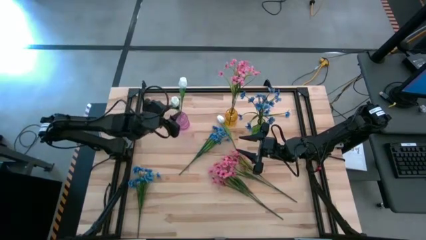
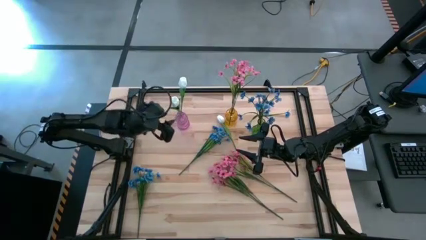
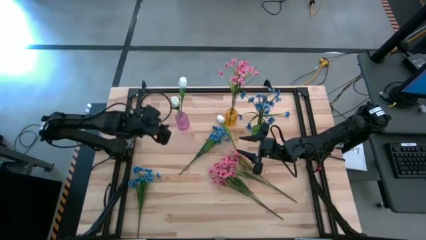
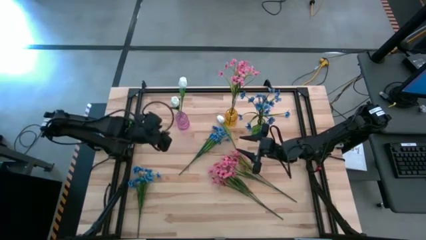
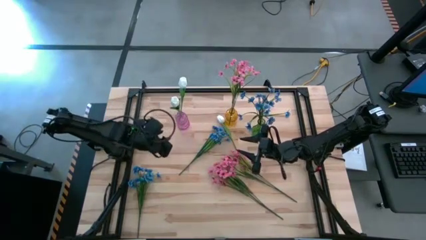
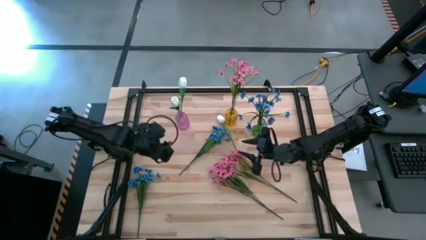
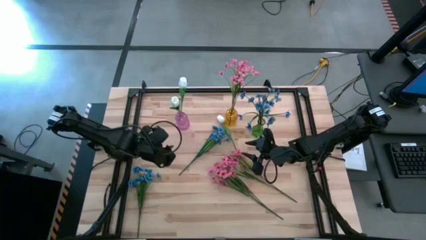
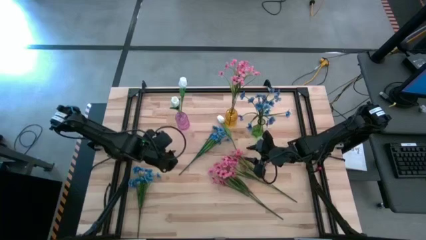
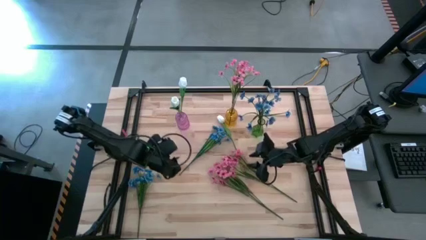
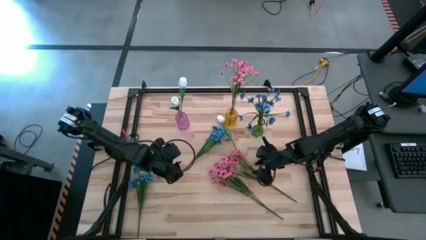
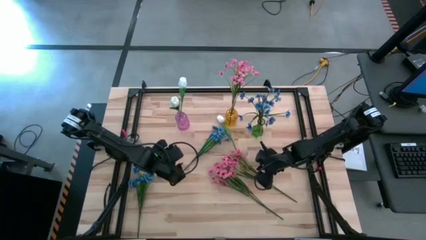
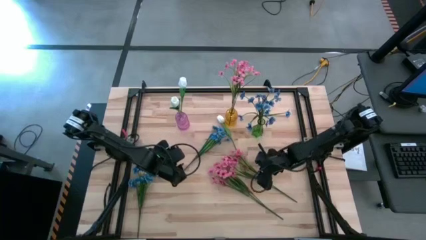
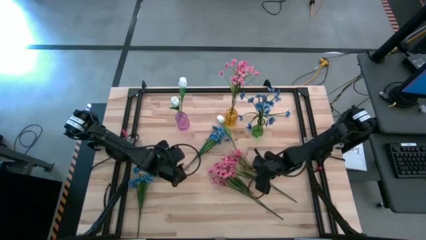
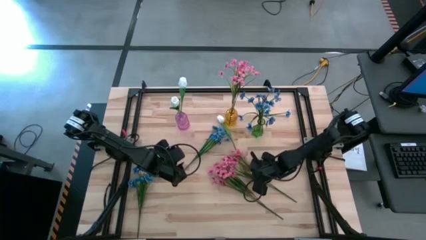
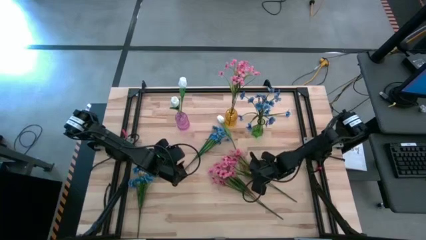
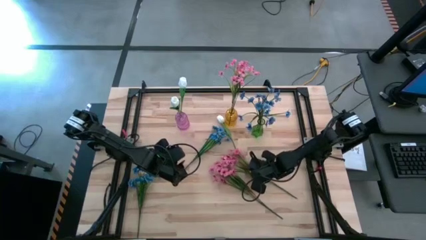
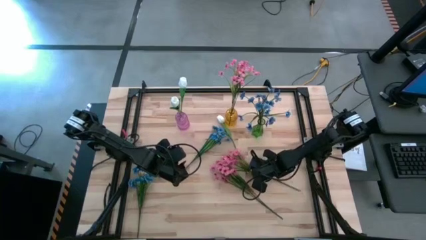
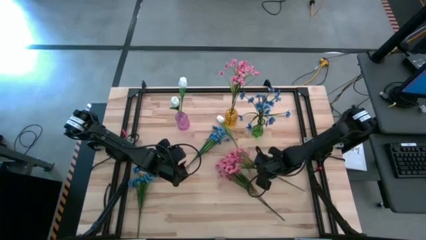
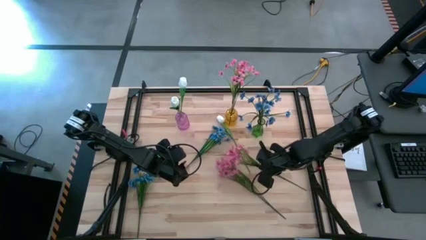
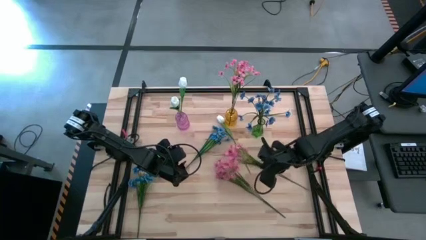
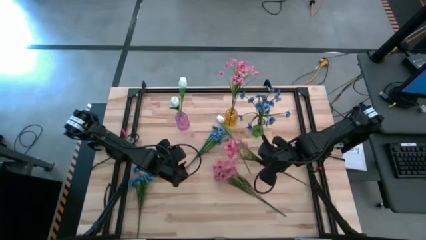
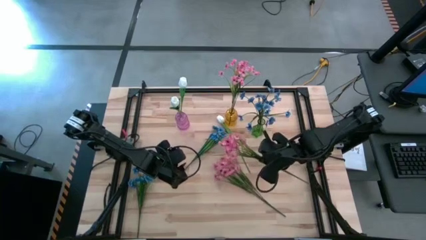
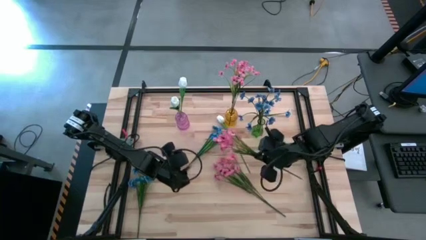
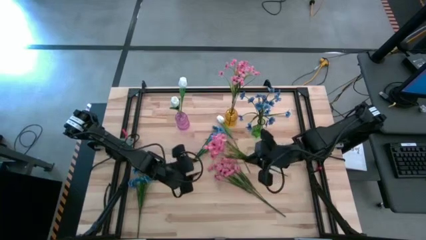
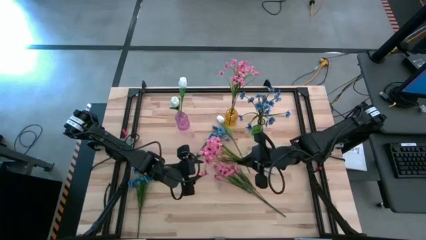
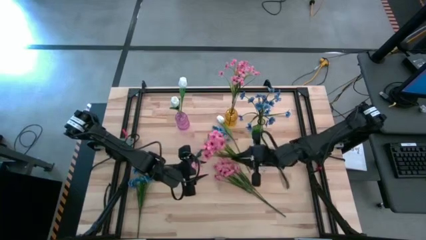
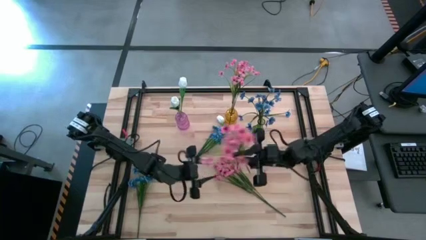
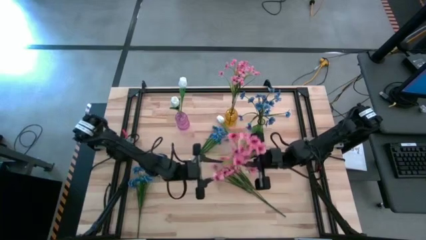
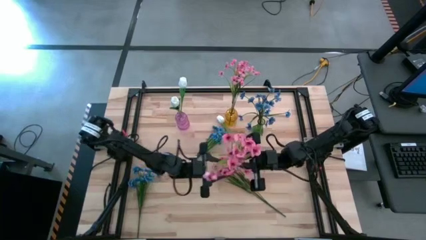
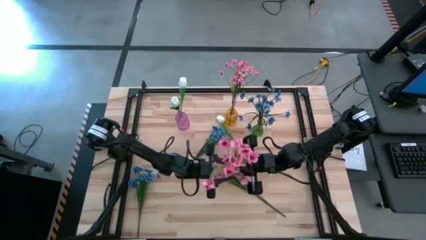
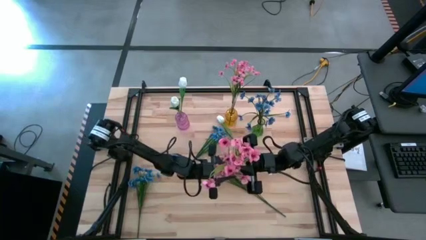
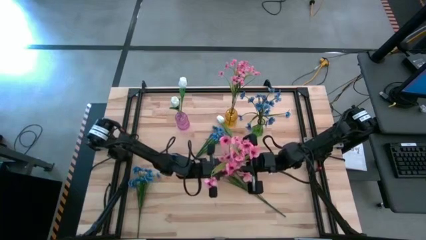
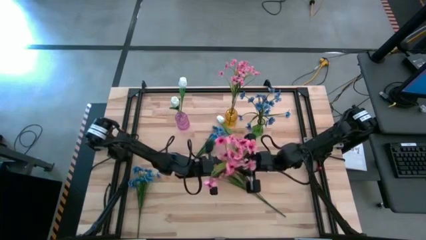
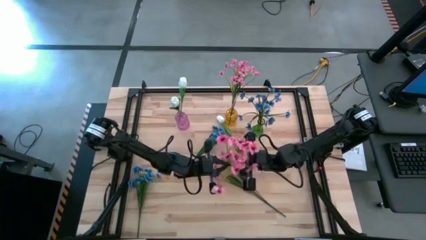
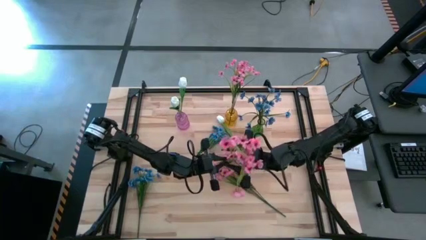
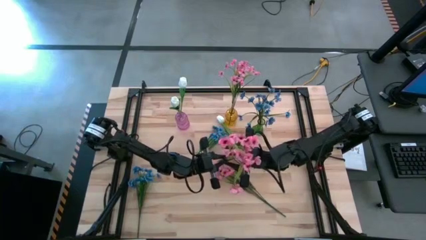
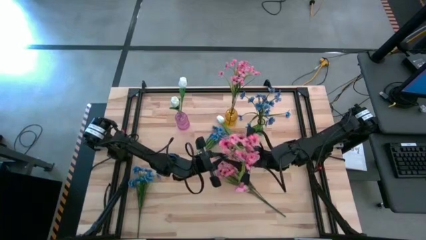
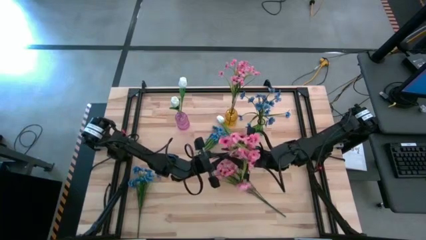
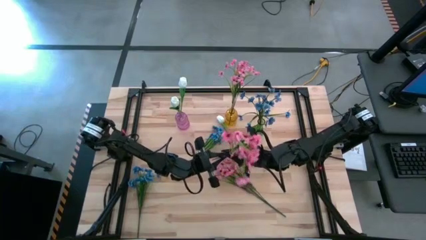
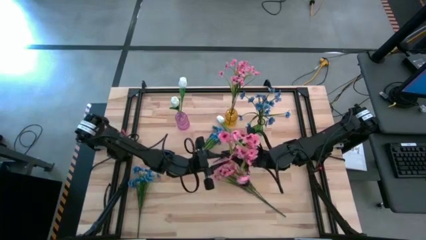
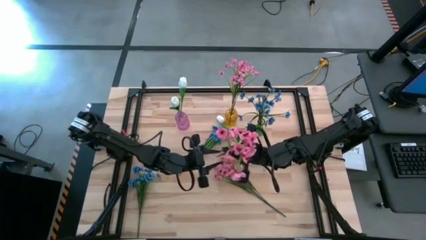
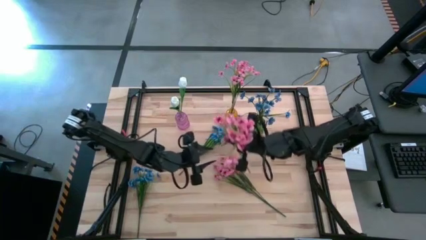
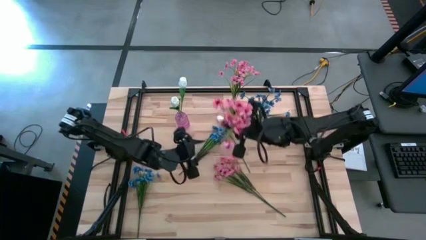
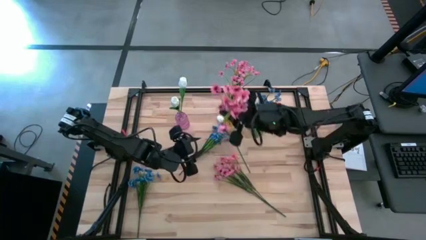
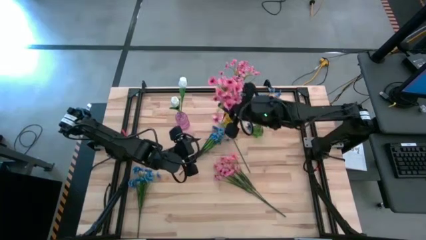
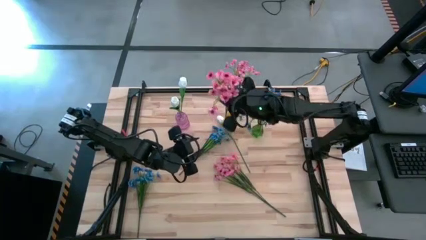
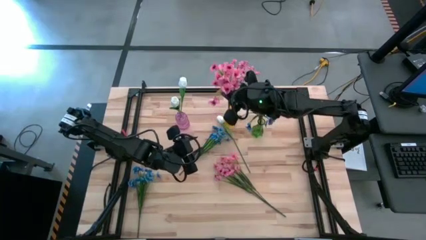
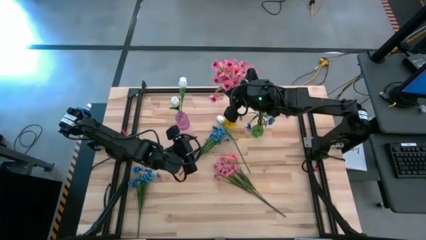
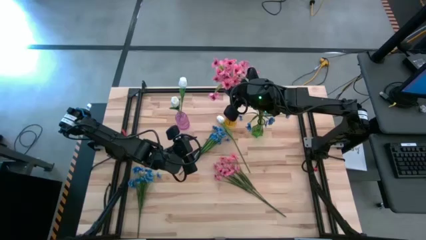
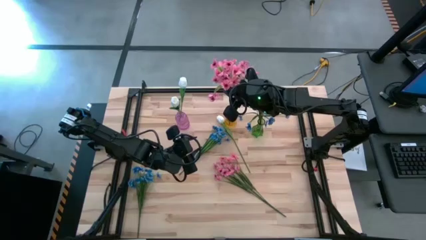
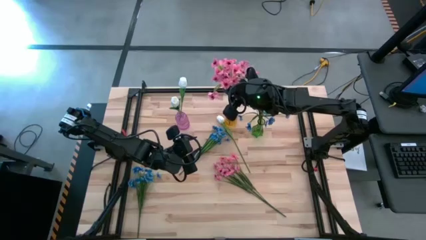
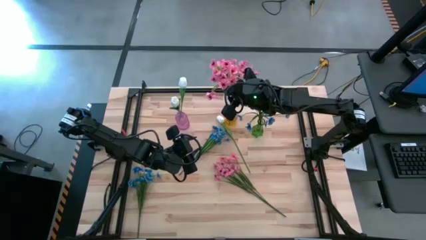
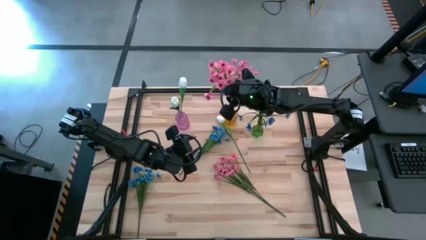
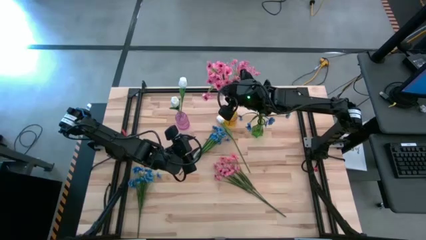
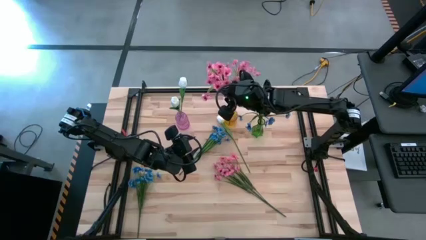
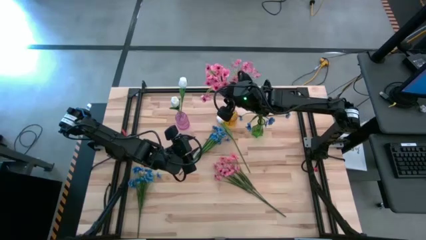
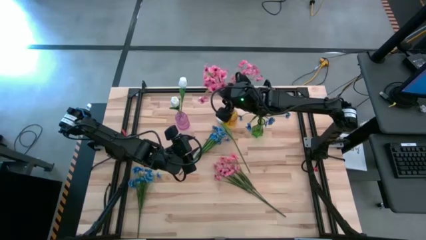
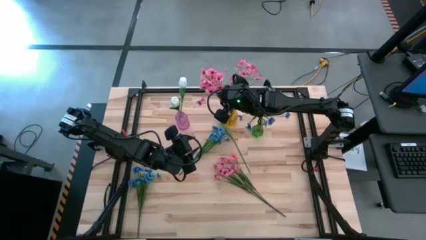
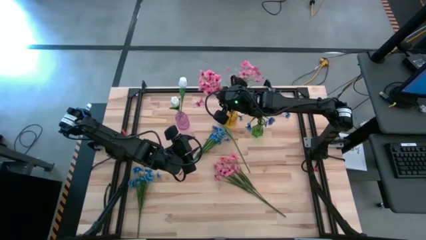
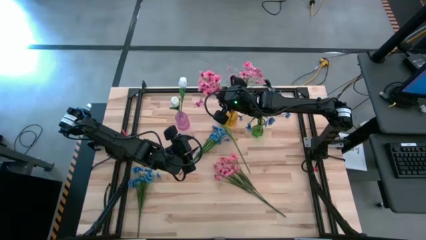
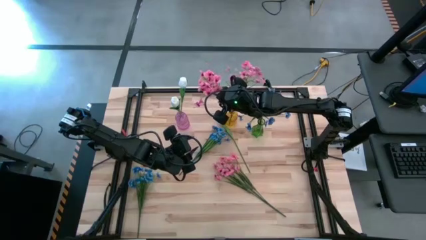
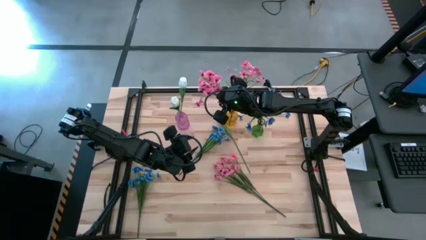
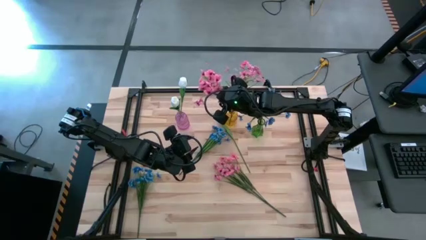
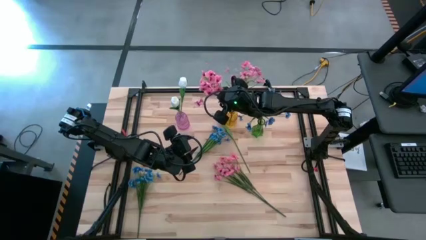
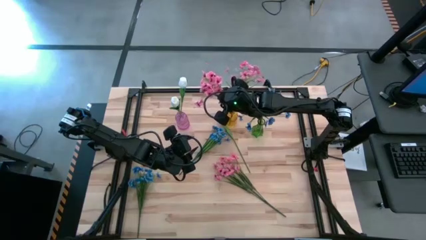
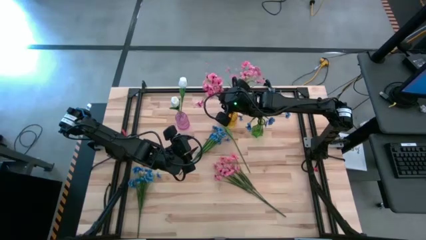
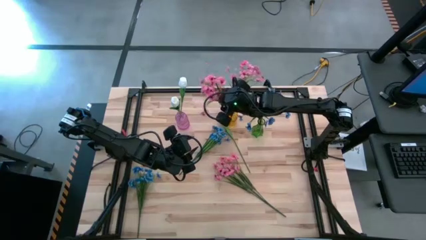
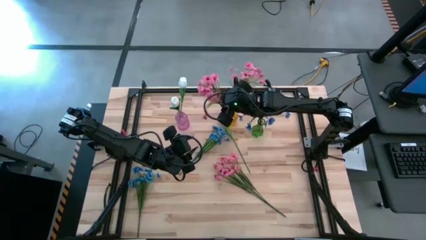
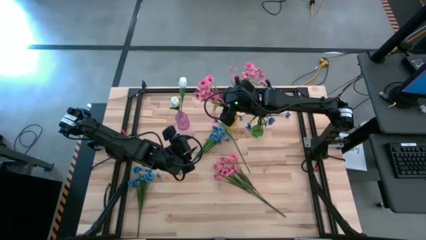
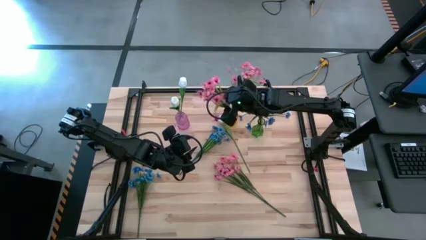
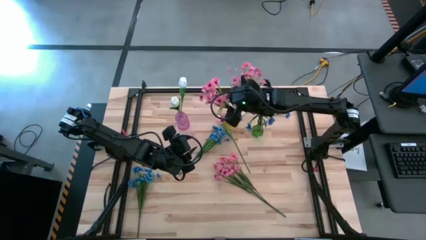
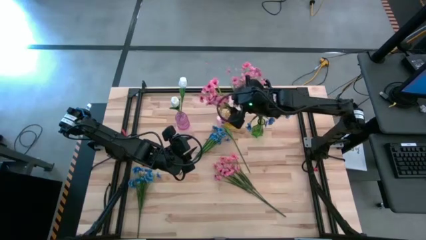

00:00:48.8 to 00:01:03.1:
Task: Sort flowers into vase by color
Put the top pink flowers into the yellow vase
